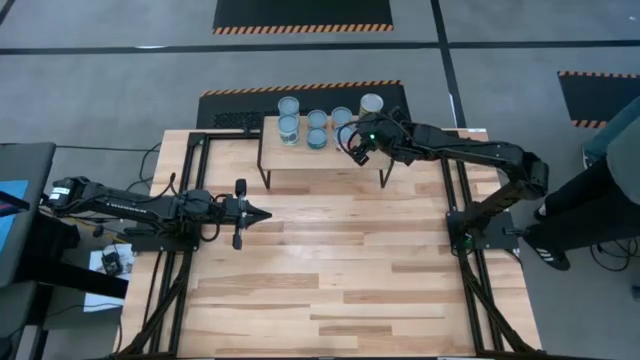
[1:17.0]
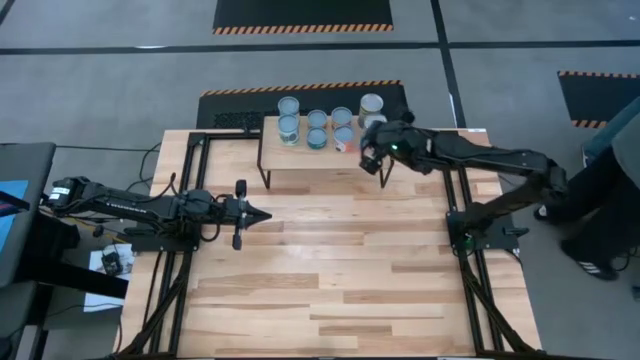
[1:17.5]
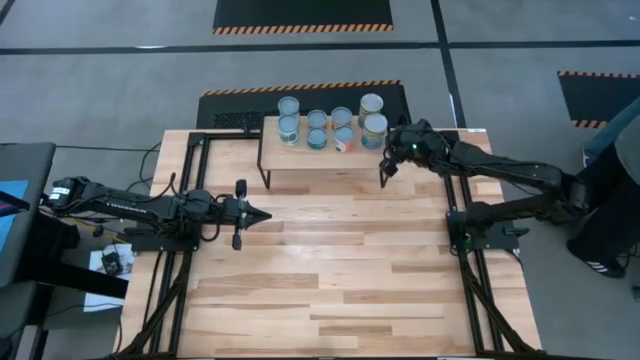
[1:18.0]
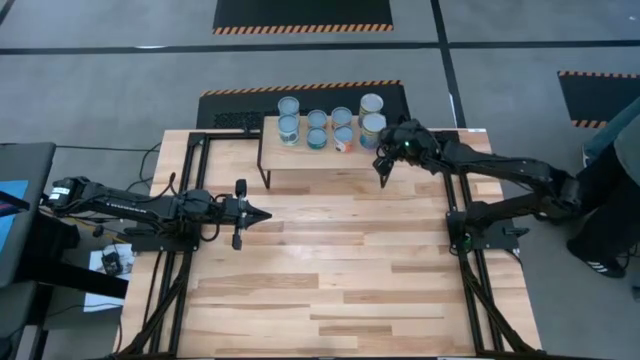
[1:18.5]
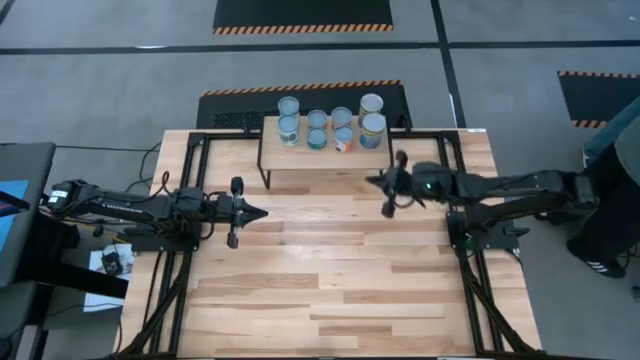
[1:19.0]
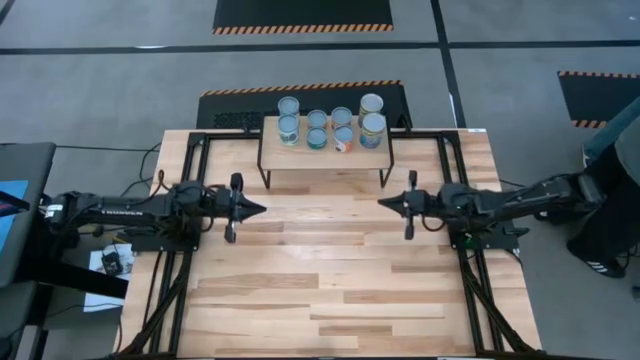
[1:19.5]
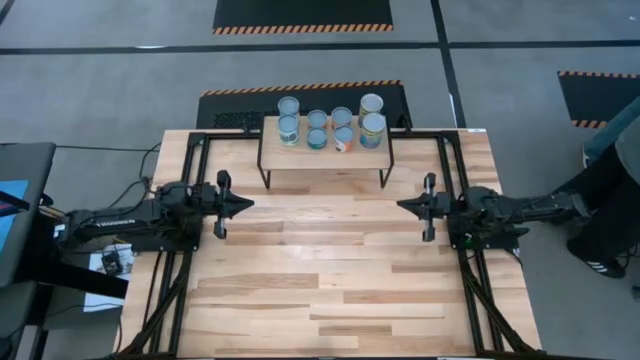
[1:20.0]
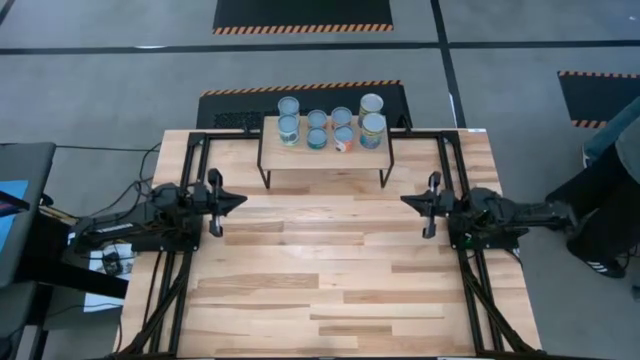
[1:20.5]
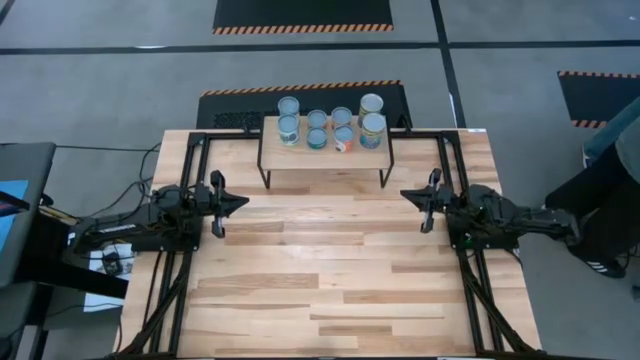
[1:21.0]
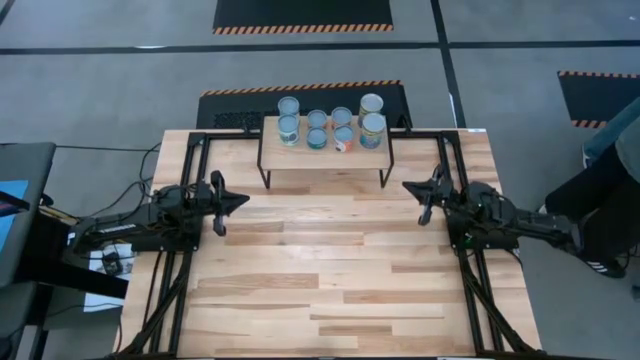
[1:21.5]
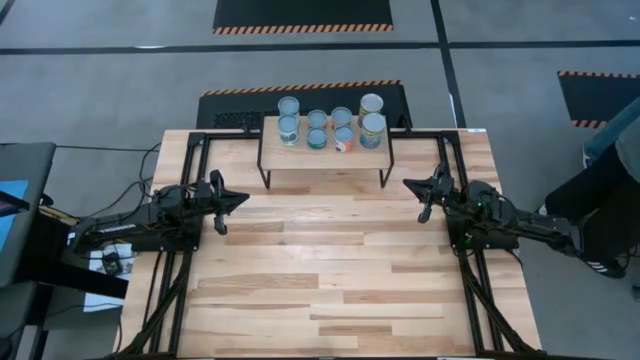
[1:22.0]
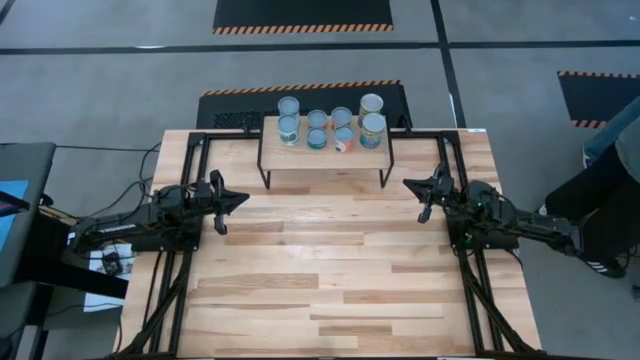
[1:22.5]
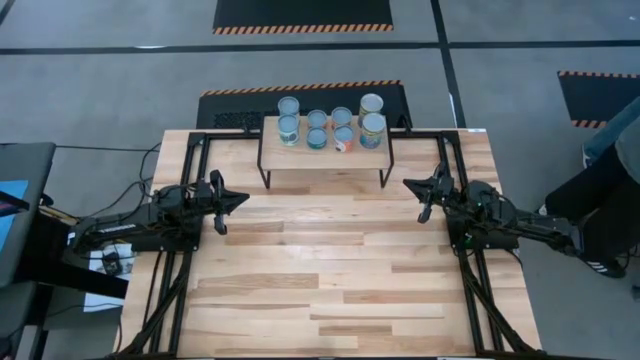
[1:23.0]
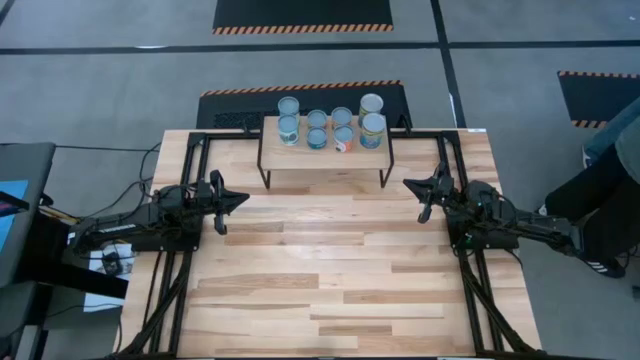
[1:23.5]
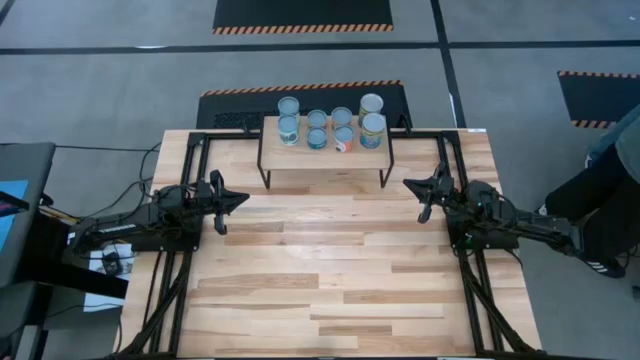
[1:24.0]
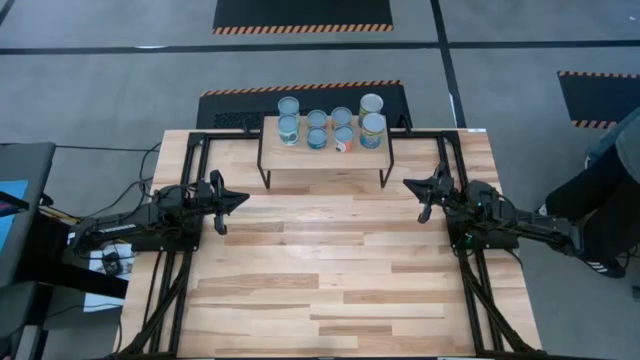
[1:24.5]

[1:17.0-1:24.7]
Task: Pick and place cans onto a shelf
Return to Home Position

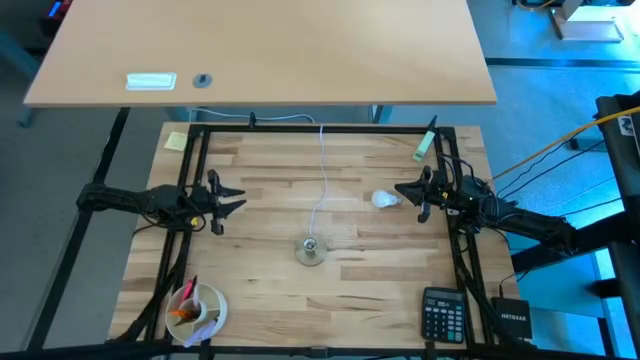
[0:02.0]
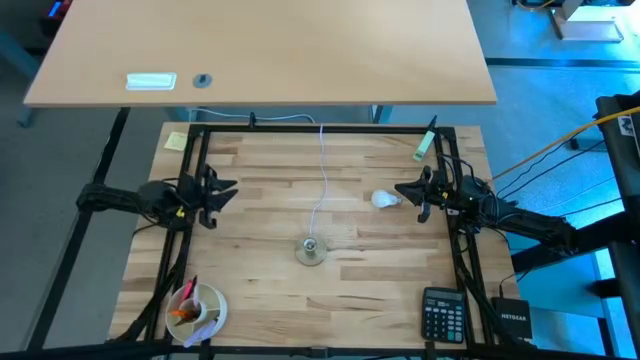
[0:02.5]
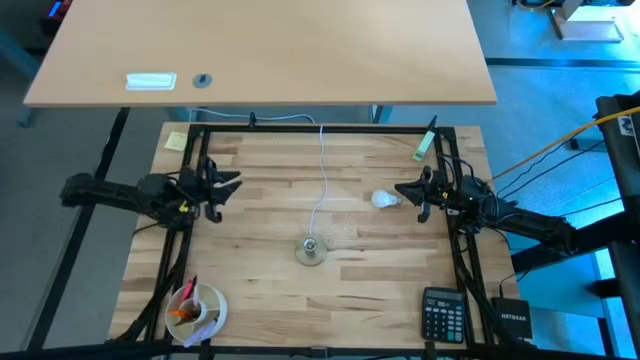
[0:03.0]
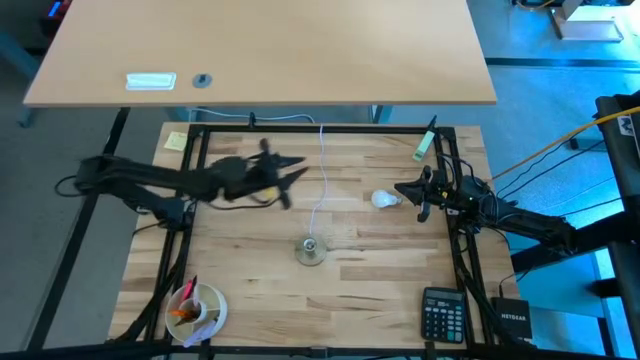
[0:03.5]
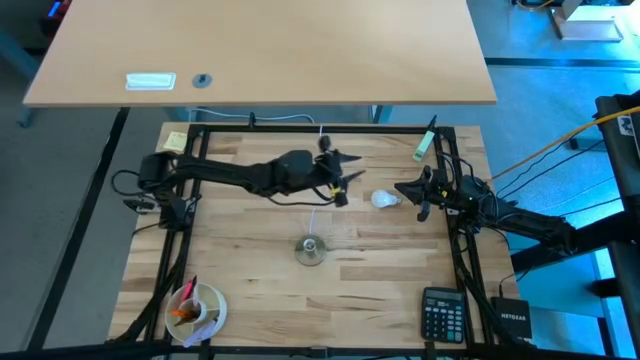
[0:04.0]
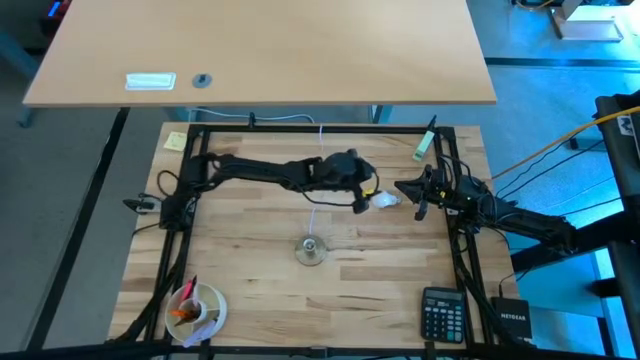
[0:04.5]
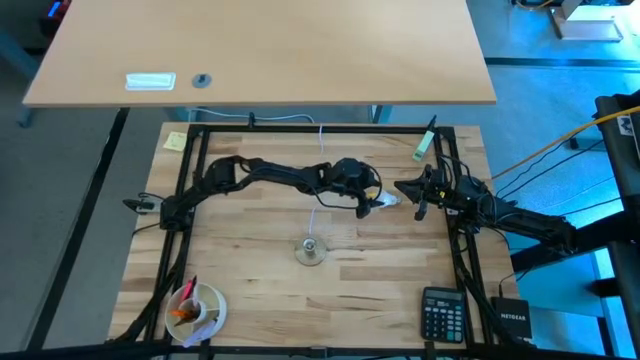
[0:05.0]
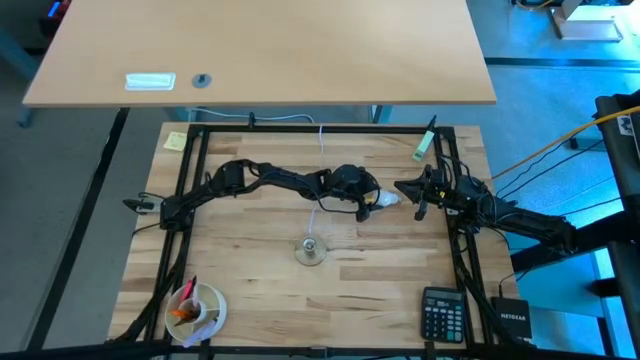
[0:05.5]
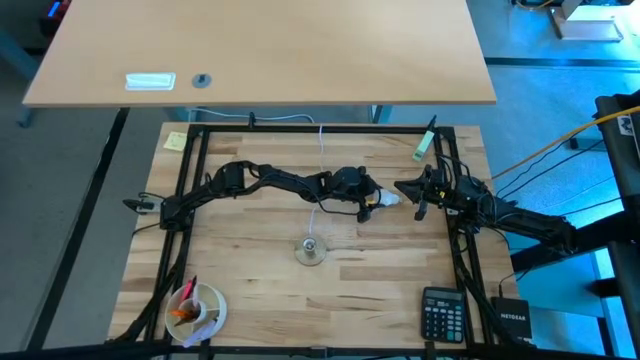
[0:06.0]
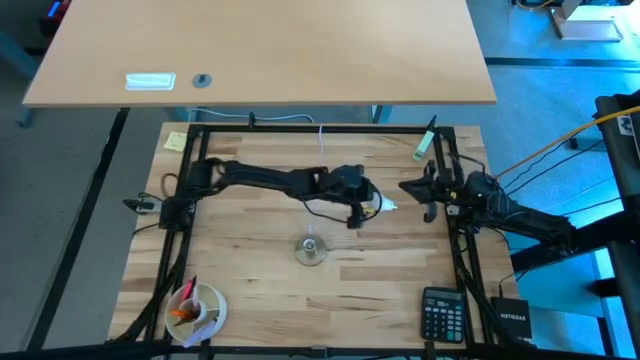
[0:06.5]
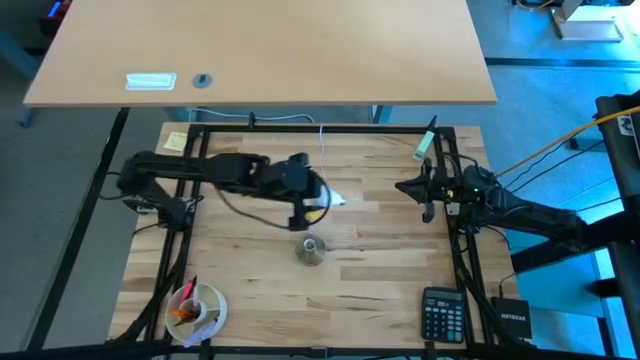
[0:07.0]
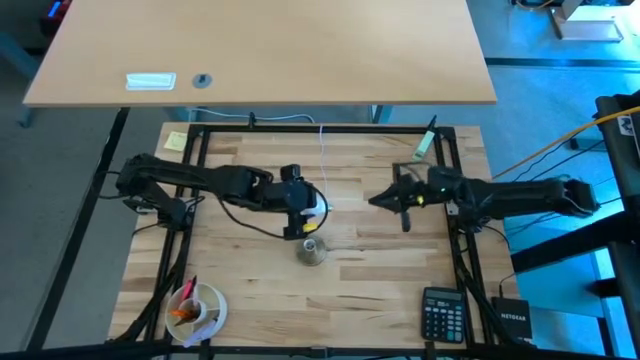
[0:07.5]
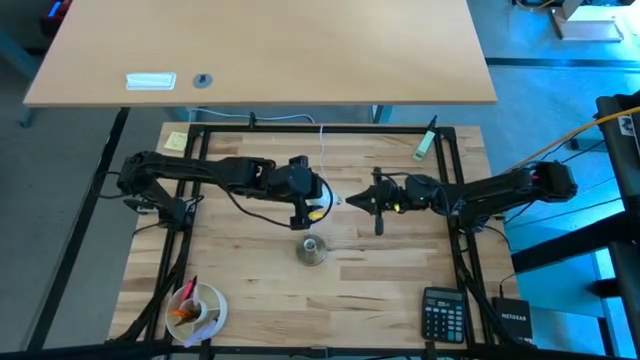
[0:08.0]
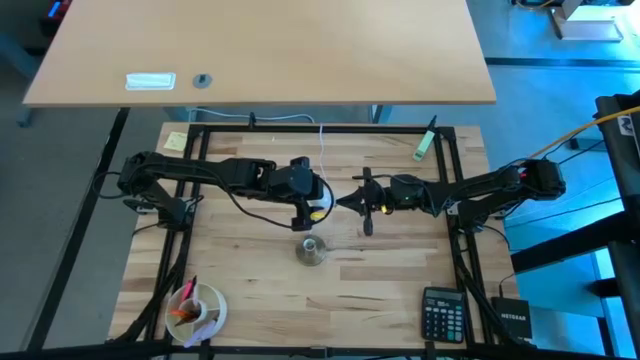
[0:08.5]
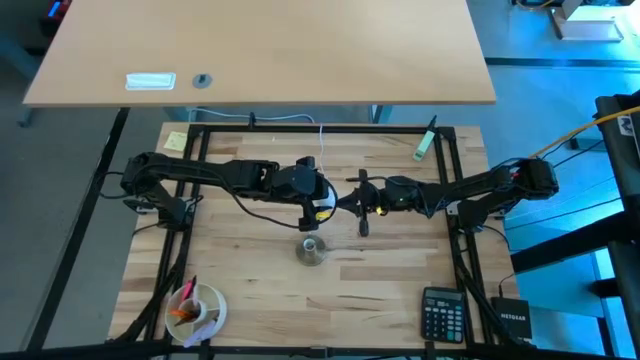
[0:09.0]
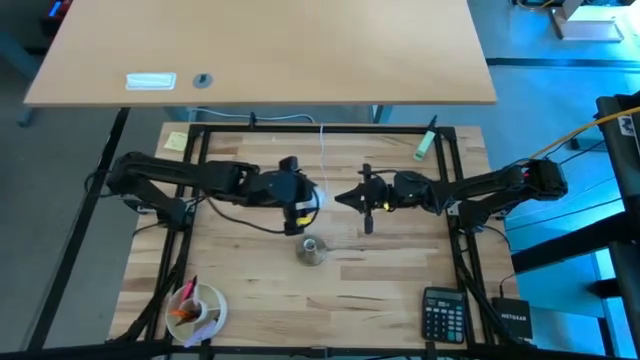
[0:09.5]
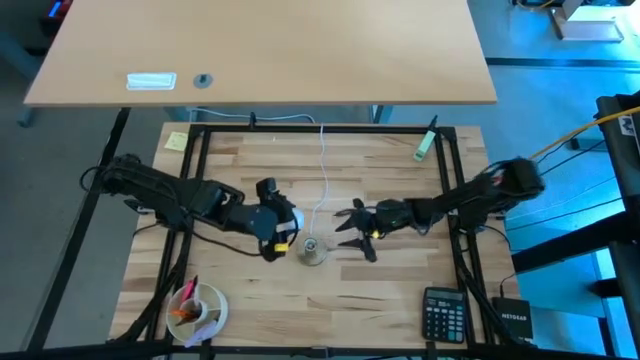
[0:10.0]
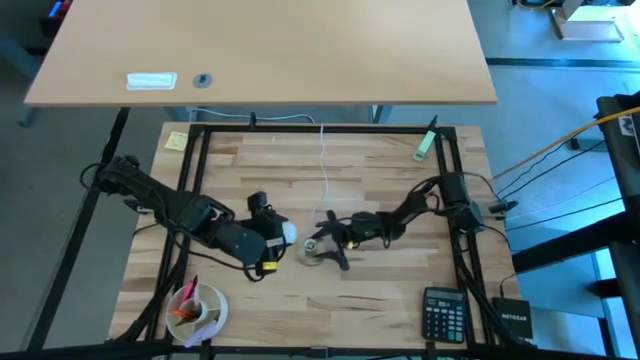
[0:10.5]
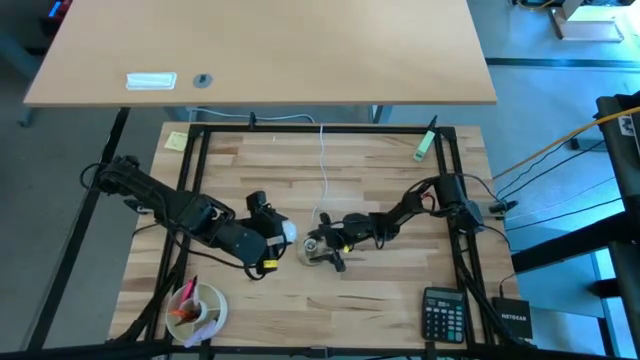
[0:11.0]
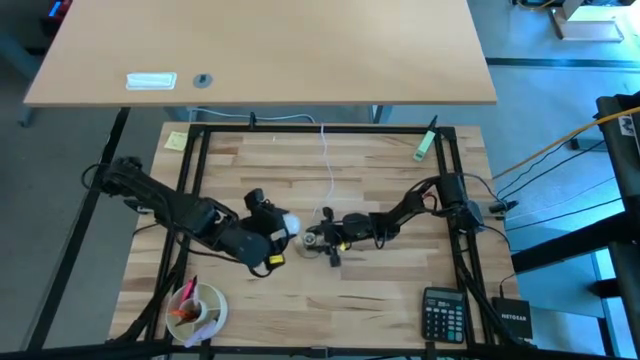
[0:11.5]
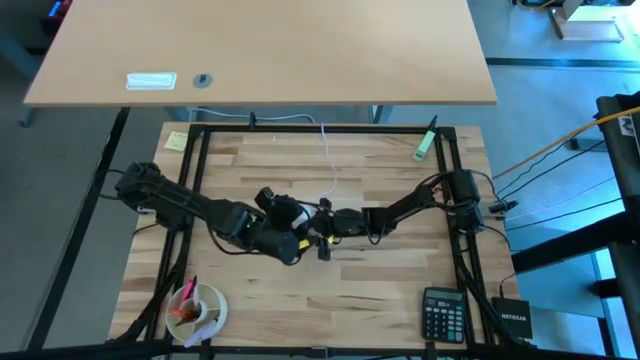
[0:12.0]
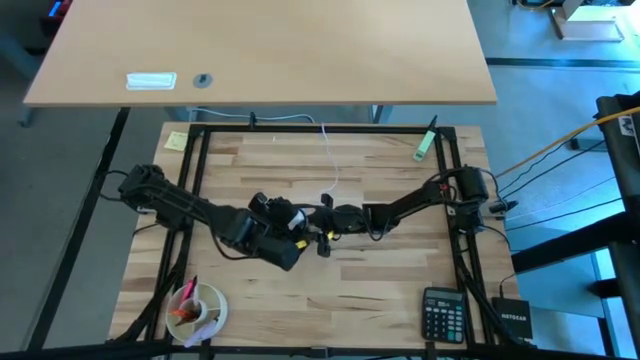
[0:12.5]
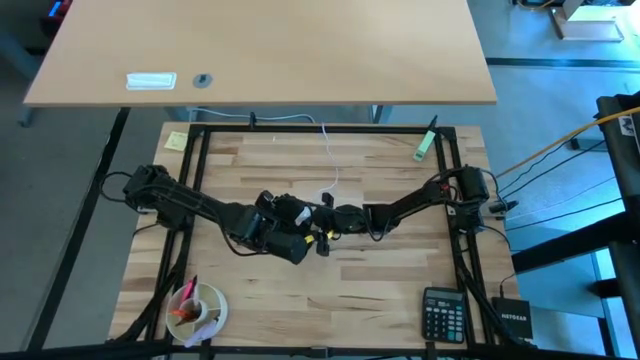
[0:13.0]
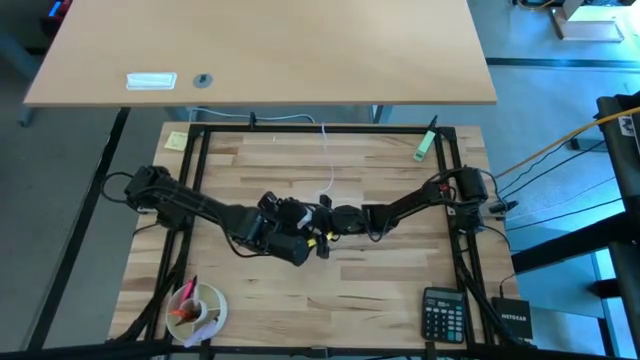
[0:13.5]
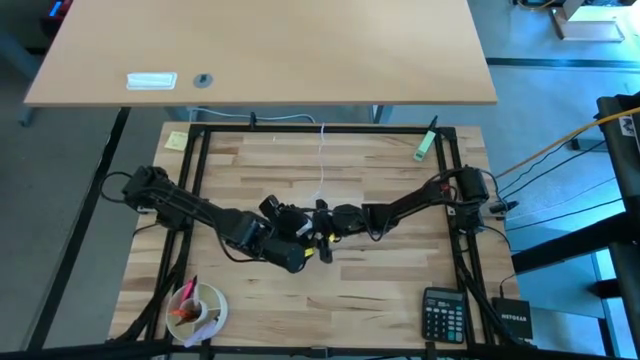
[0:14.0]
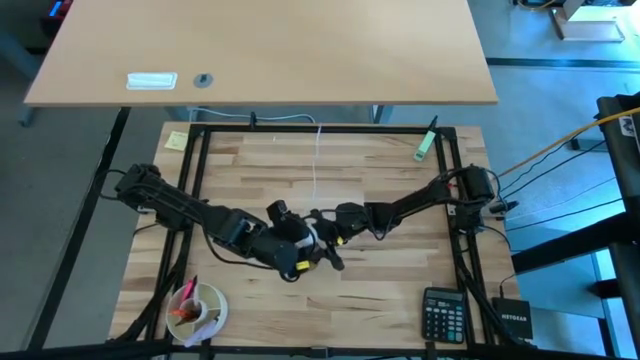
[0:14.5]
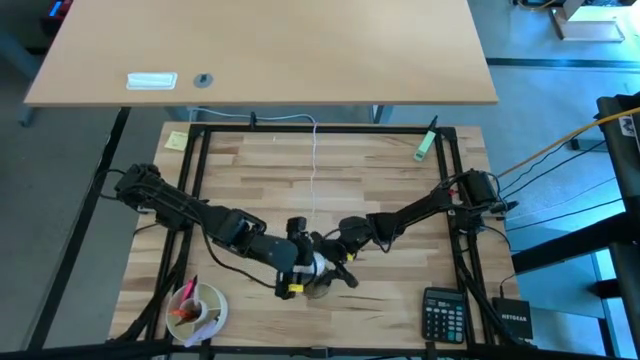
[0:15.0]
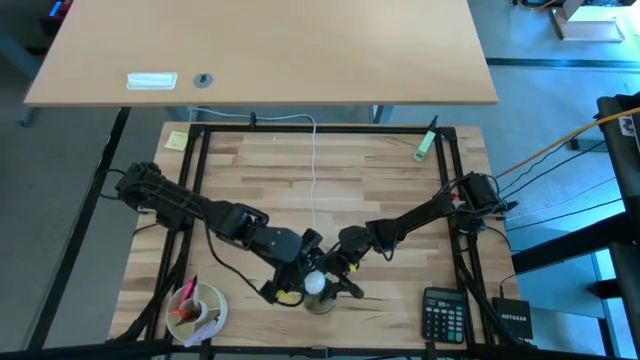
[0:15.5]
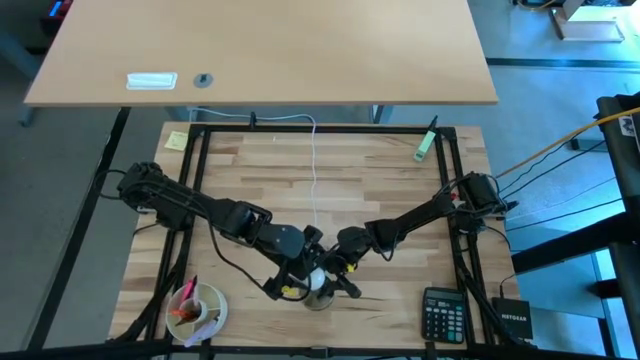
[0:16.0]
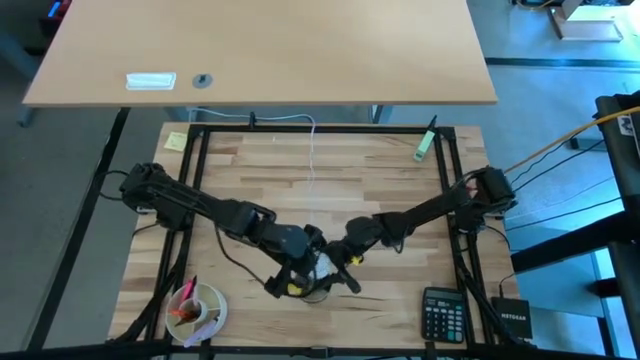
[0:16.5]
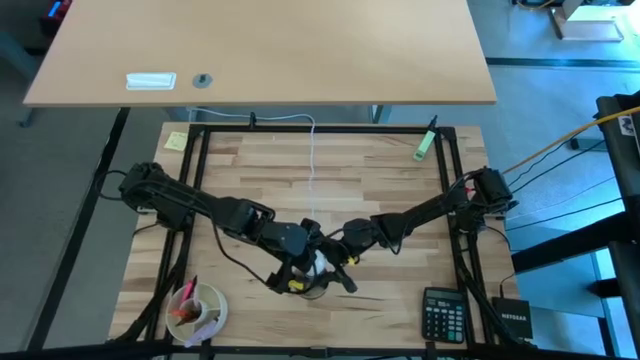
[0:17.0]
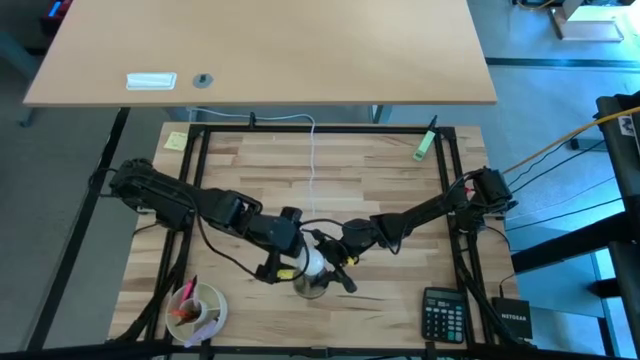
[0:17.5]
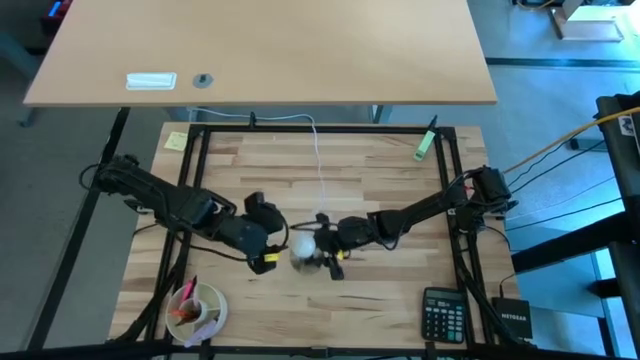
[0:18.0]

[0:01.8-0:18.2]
Task: Screw lightbulb
Insert the lightbulb into the lamp
